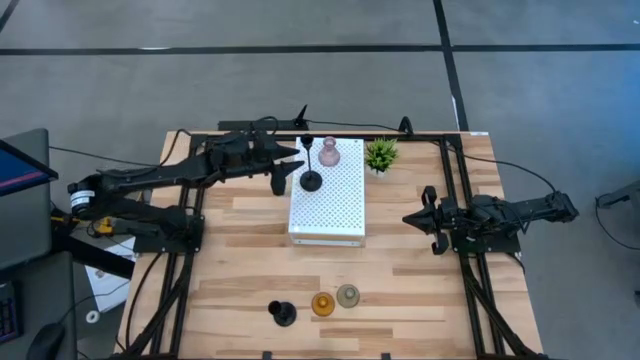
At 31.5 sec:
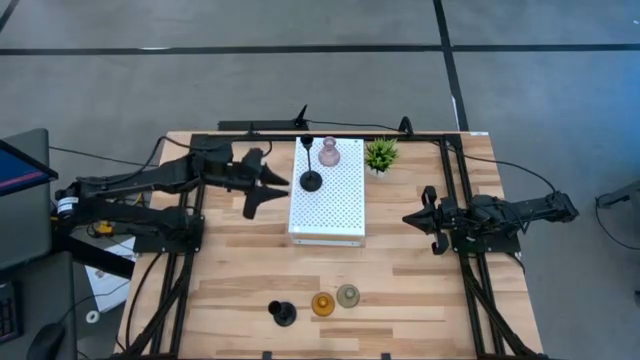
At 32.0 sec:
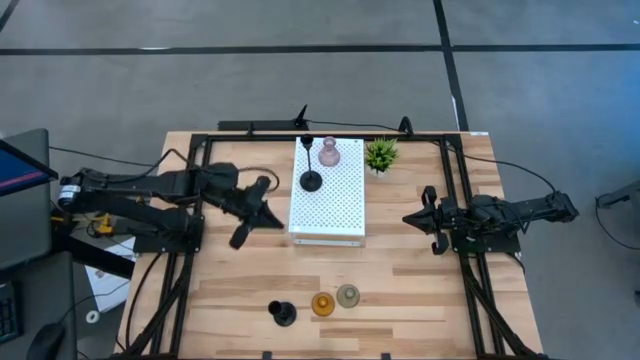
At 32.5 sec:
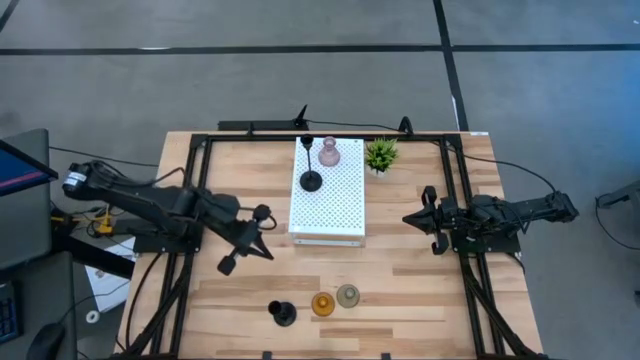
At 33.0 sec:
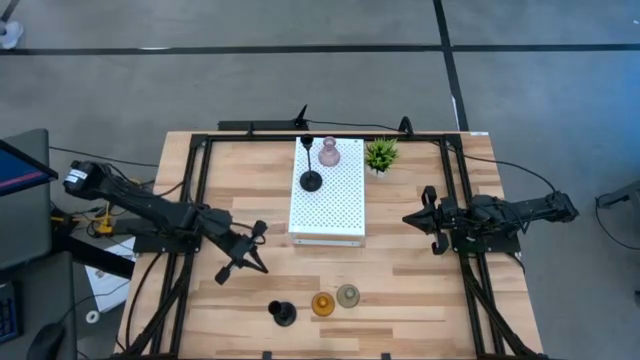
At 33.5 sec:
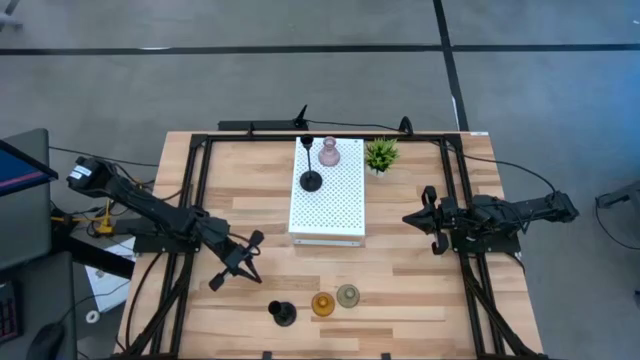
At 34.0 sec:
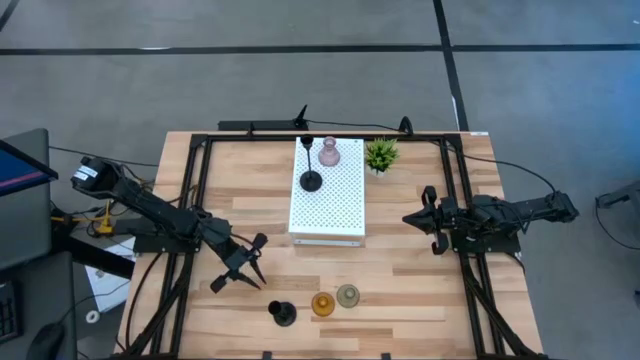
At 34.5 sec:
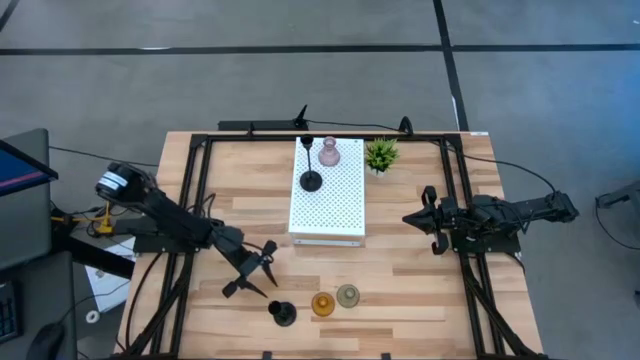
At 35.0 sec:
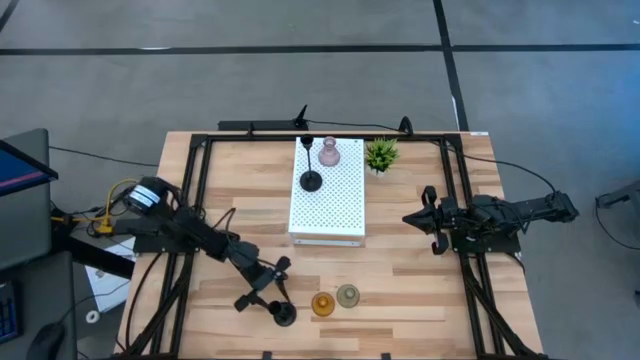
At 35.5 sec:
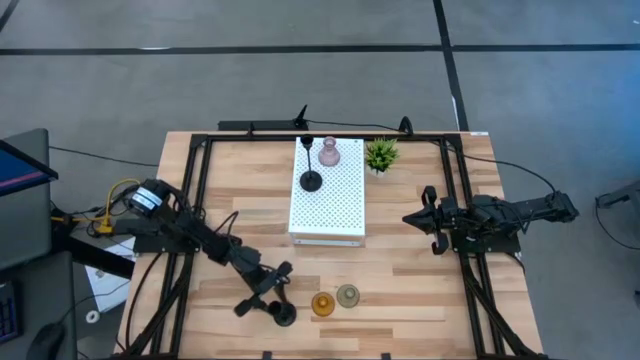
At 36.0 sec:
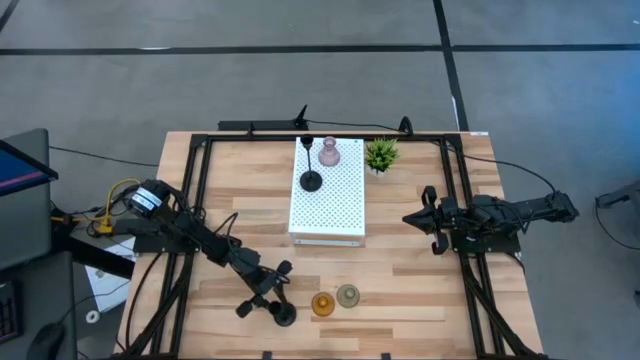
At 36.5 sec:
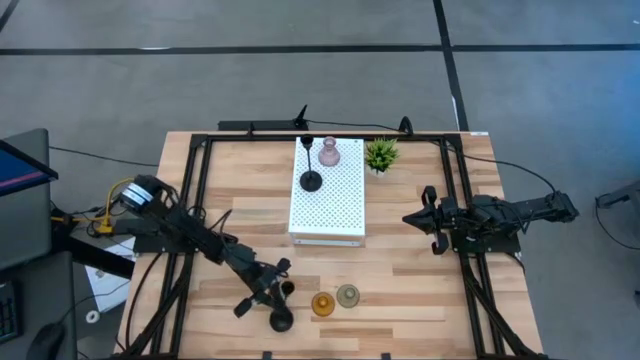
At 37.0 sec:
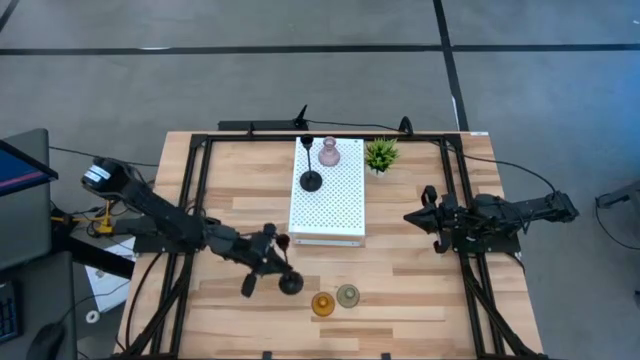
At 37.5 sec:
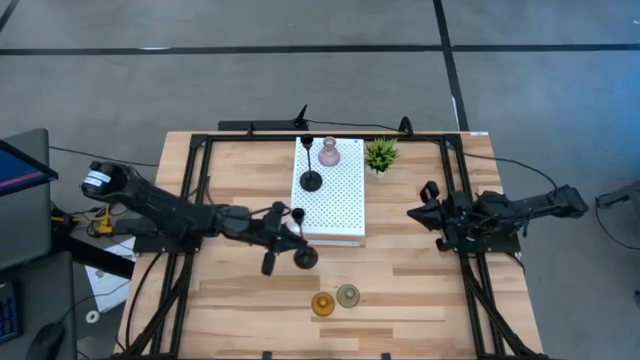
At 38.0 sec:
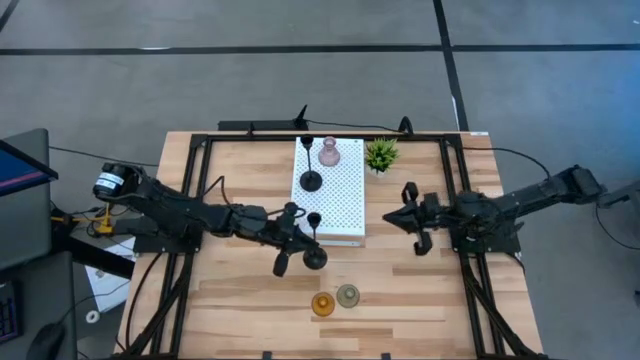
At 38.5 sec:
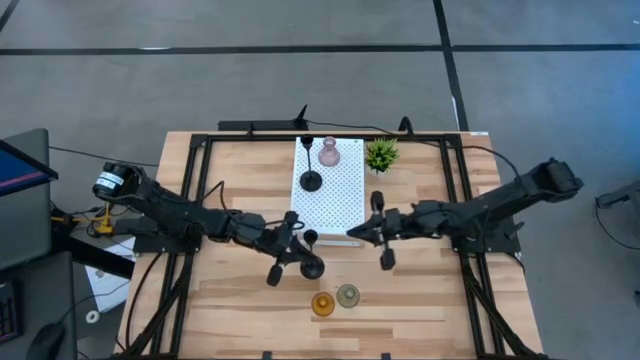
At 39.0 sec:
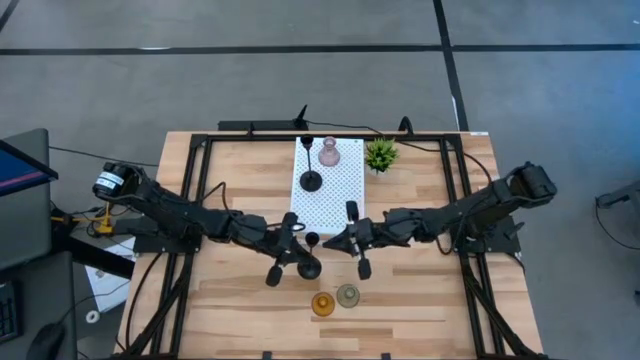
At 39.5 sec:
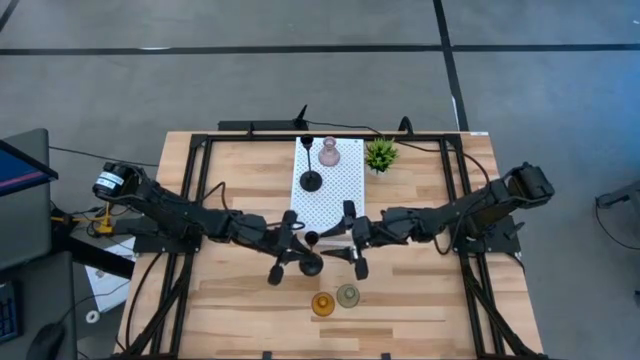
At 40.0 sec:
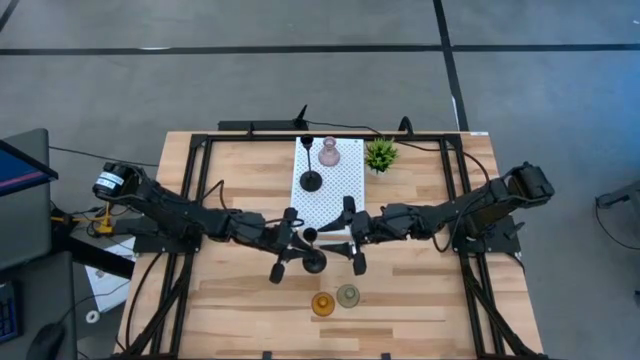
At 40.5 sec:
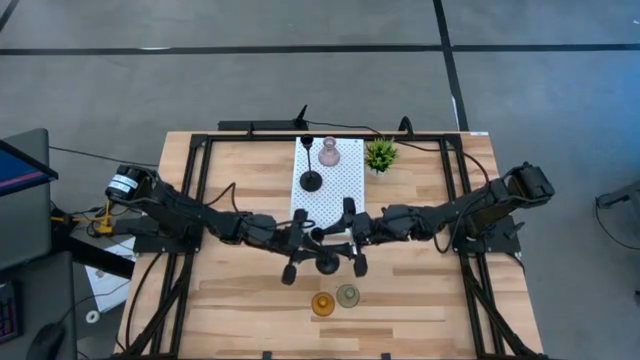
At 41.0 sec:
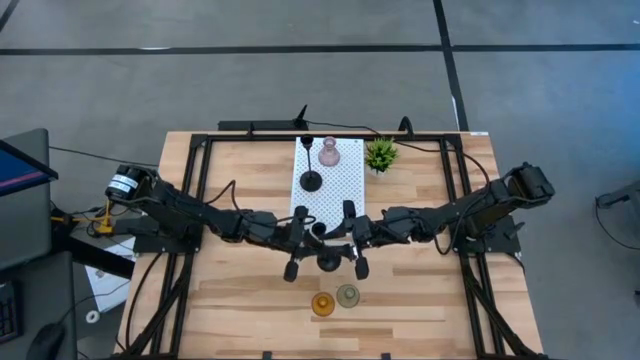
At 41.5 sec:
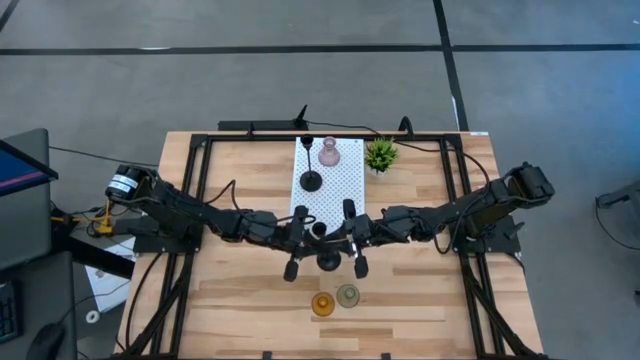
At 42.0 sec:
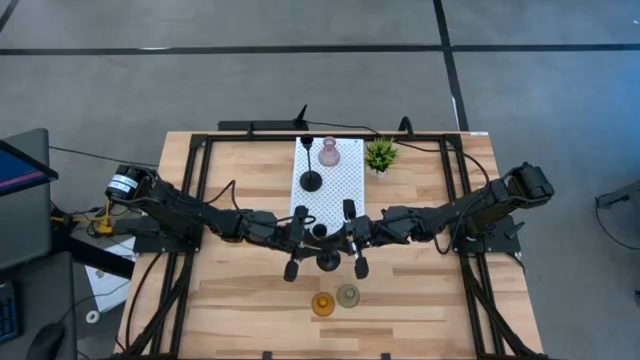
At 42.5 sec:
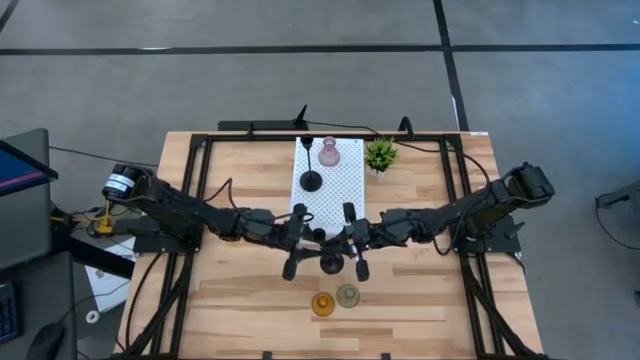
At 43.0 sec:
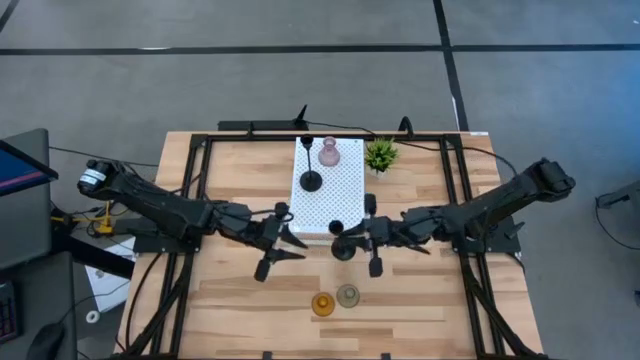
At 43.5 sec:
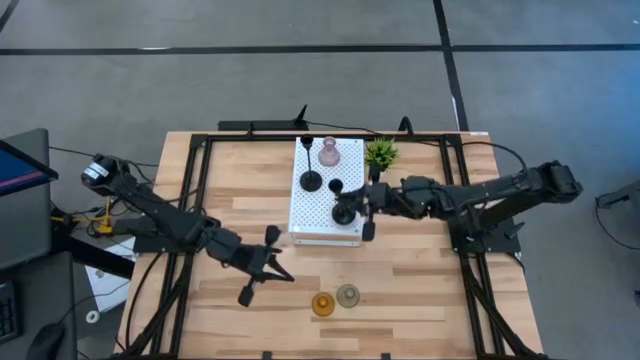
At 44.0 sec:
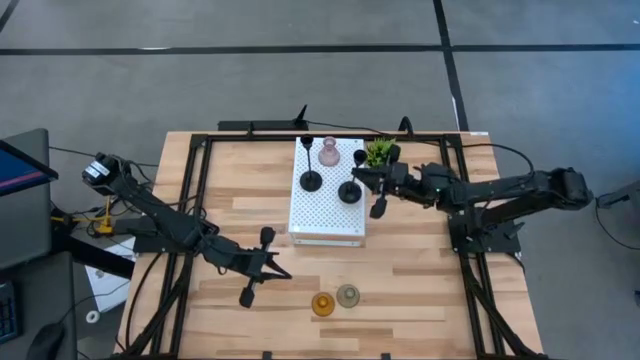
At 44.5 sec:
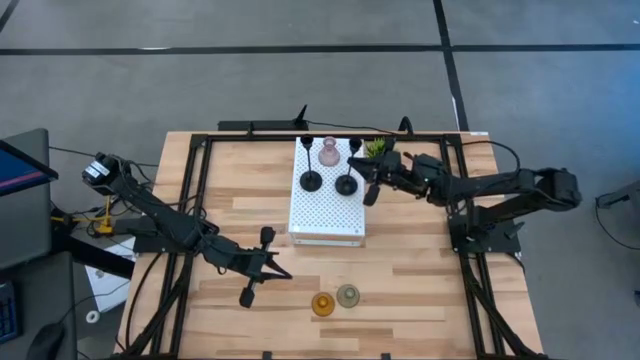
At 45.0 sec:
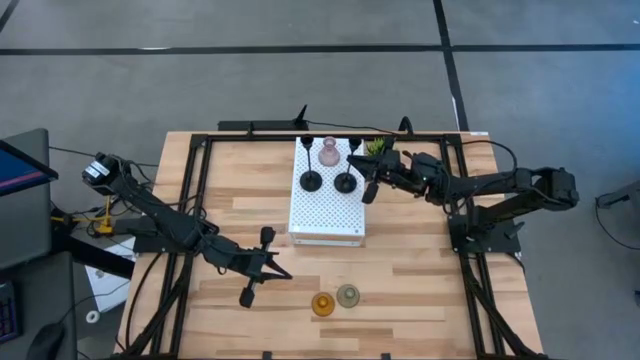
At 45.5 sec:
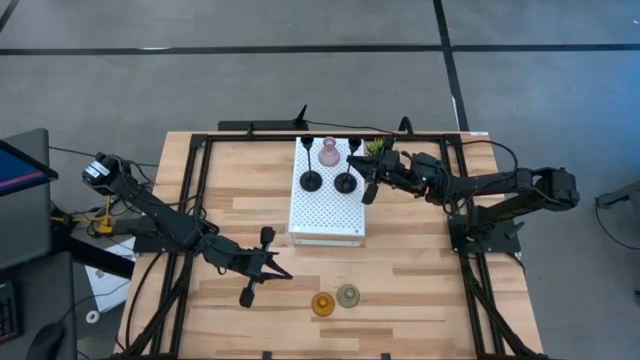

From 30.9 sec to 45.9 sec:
Task: Pick & Place candle stick holders
Align the black candle holder with the other black candle holder on the shelf

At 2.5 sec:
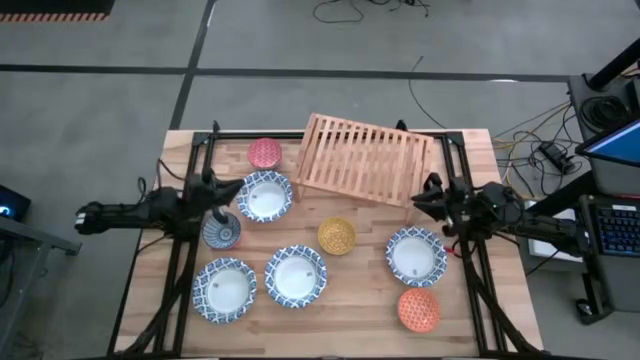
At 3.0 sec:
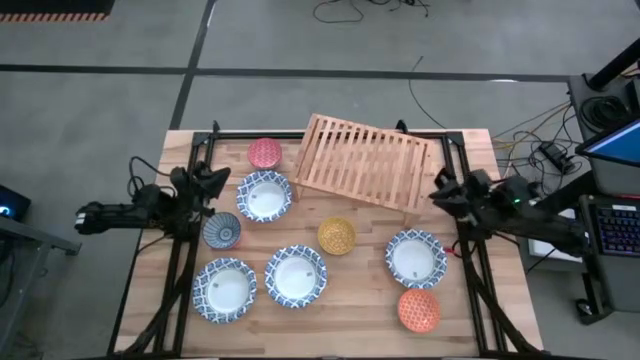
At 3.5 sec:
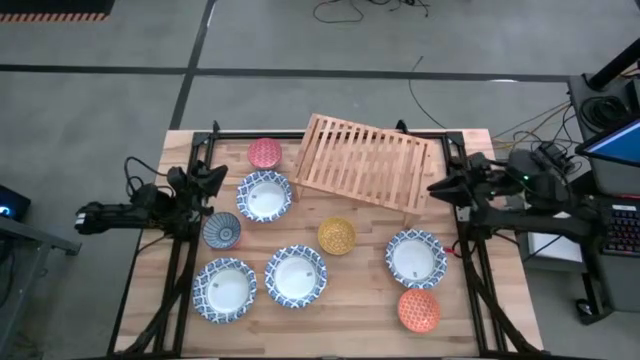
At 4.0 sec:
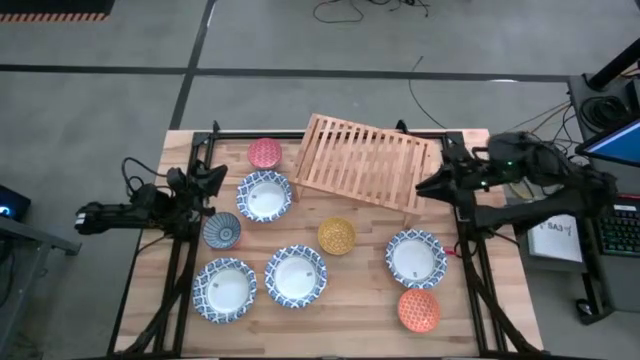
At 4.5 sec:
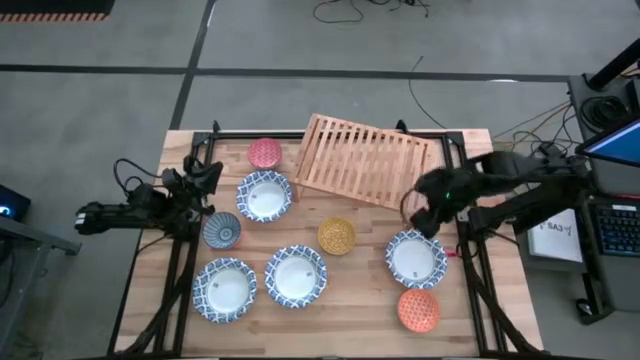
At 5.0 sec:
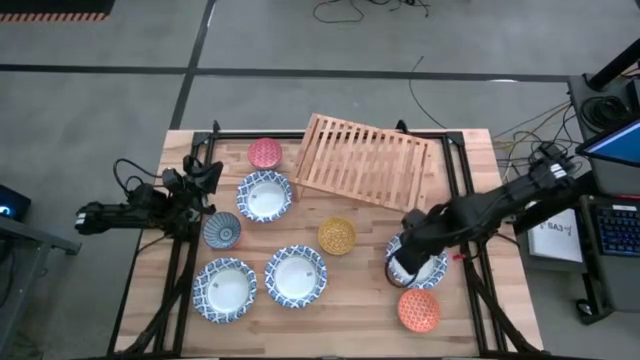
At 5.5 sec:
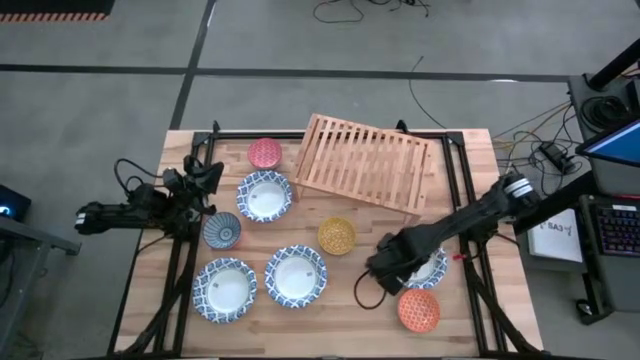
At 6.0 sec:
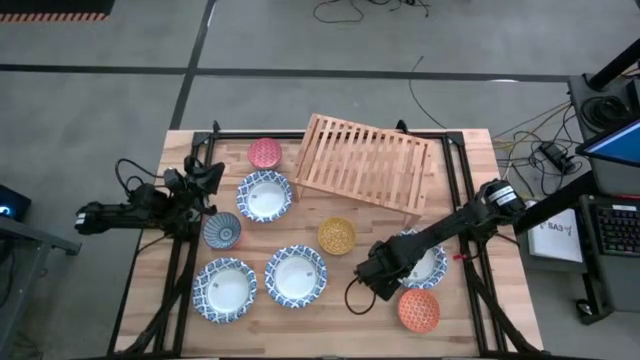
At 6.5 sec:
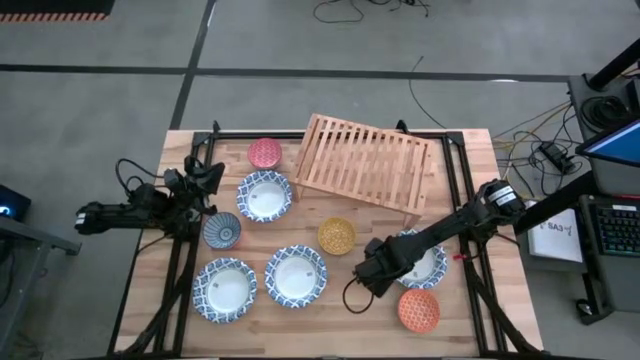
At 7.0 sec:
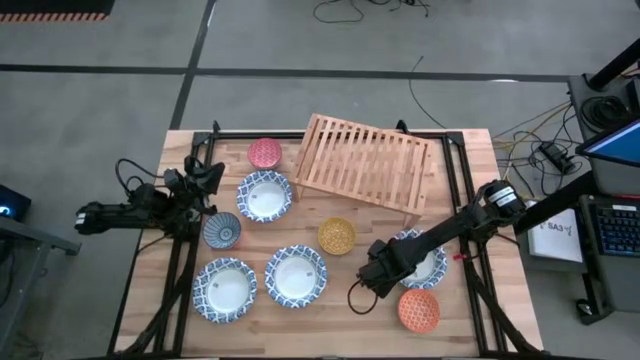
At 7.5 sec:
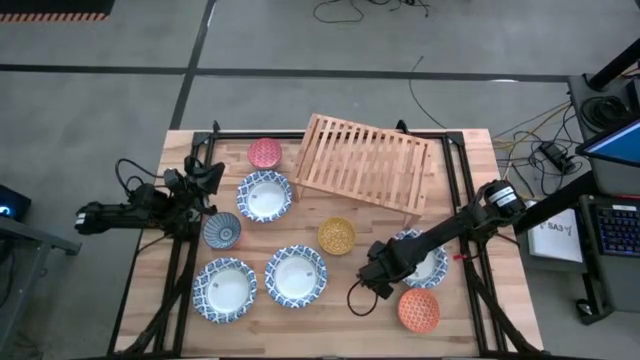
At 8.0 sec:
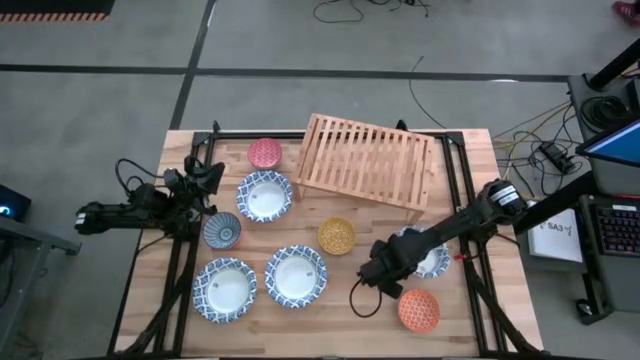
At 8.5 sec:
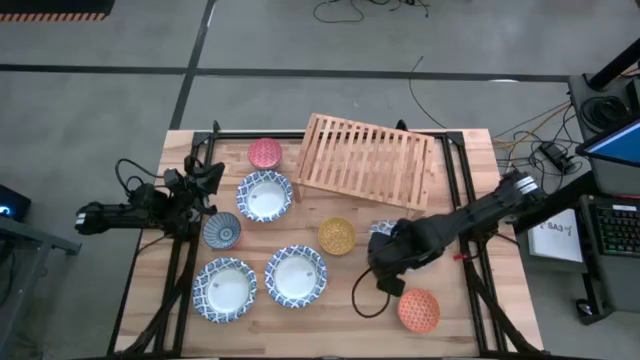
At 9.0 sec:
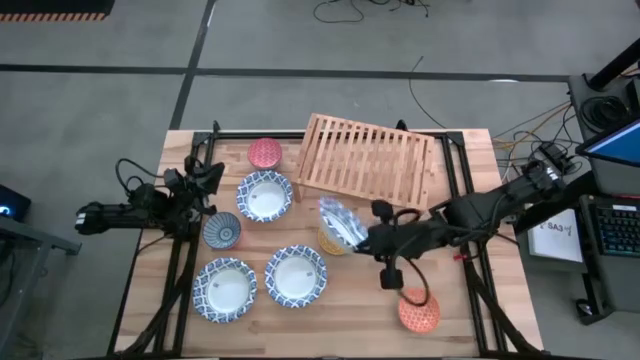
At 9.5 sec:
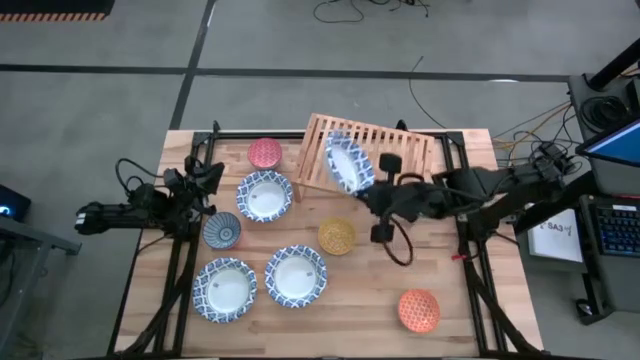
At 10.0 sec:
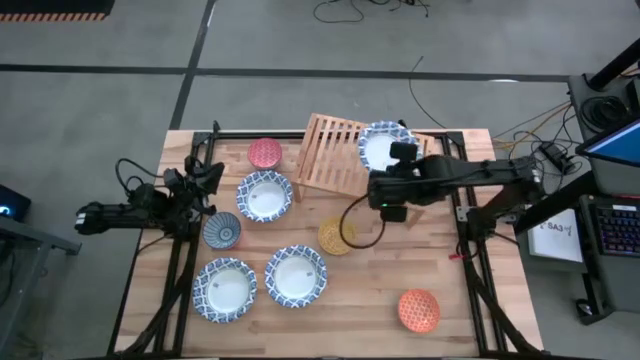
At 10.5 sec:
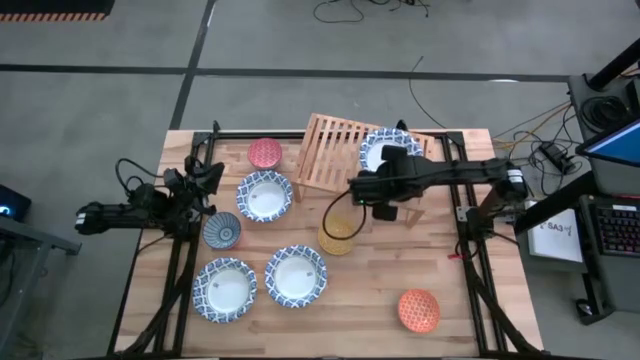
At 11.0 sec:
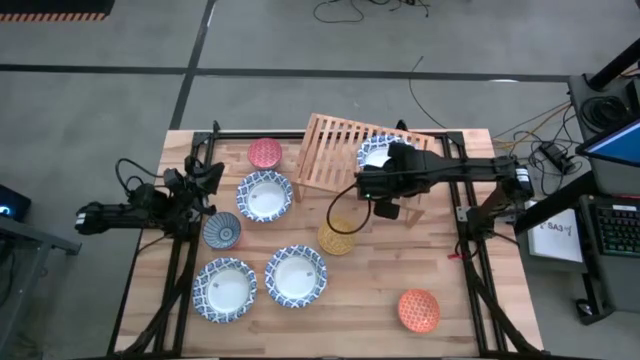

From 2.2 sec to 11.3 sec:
Task: Place and stack bowls onto a shelf
Put the white pattern bowl on the shelf
